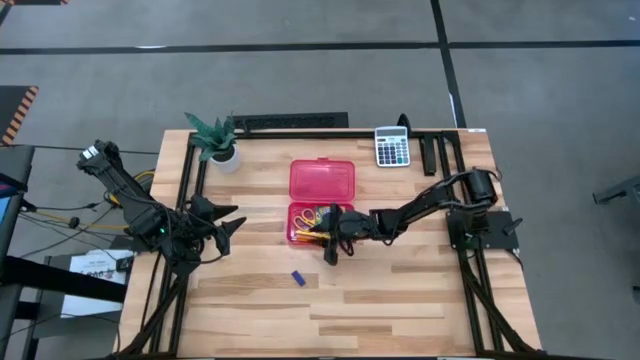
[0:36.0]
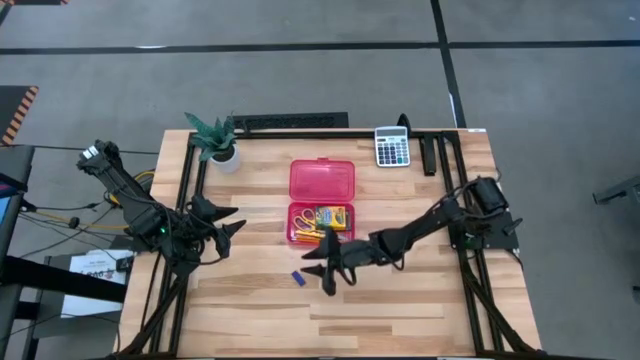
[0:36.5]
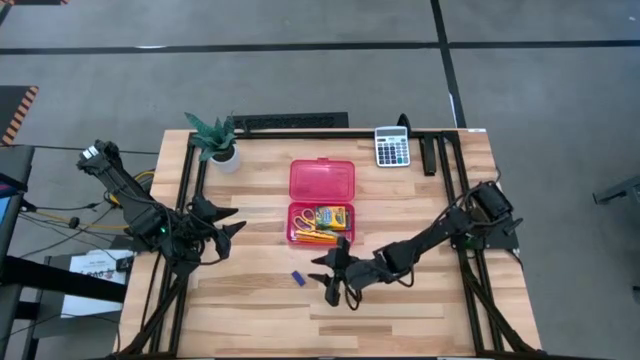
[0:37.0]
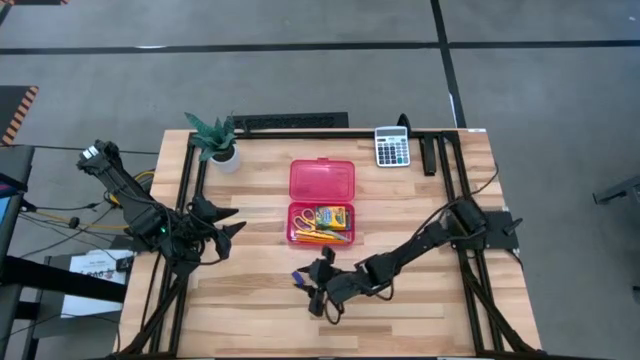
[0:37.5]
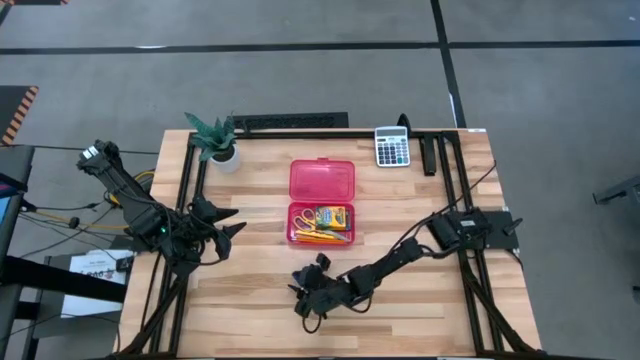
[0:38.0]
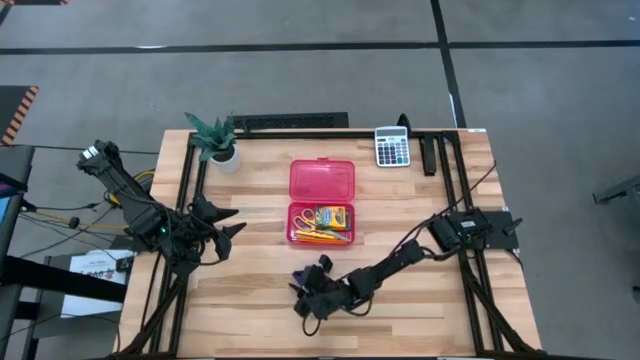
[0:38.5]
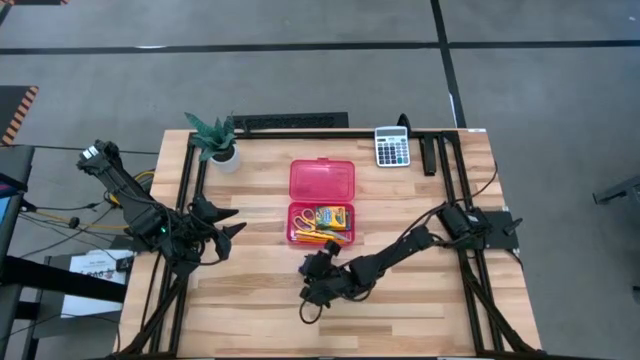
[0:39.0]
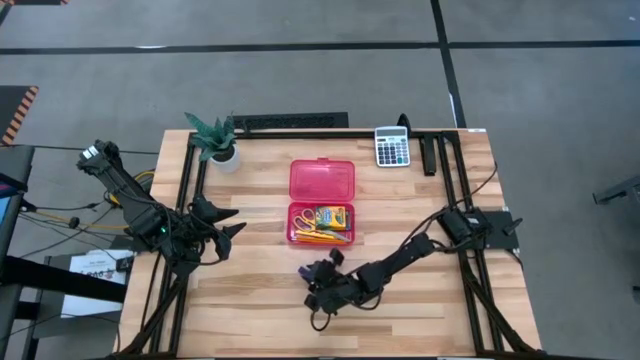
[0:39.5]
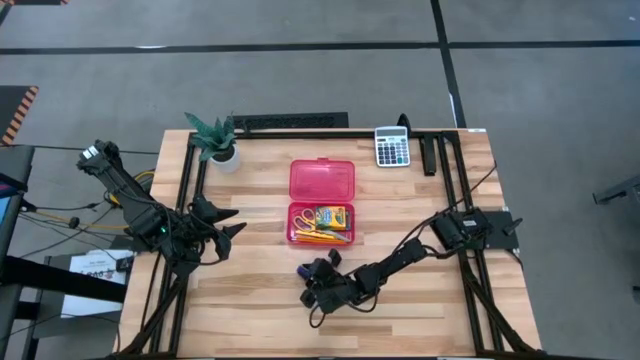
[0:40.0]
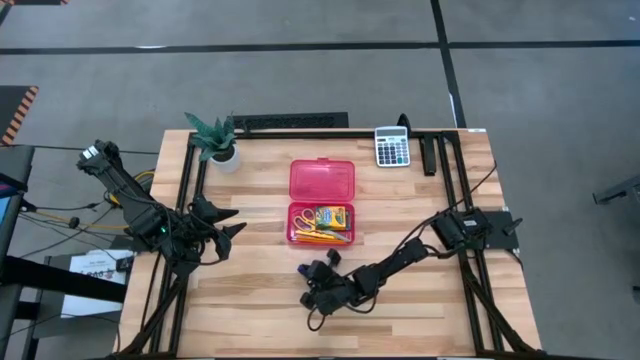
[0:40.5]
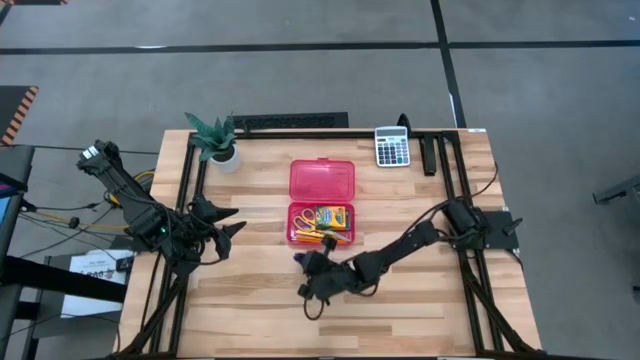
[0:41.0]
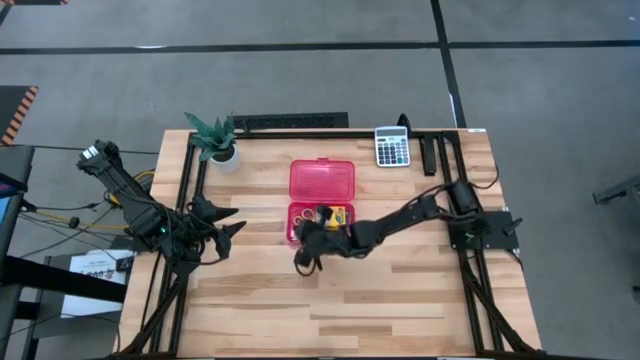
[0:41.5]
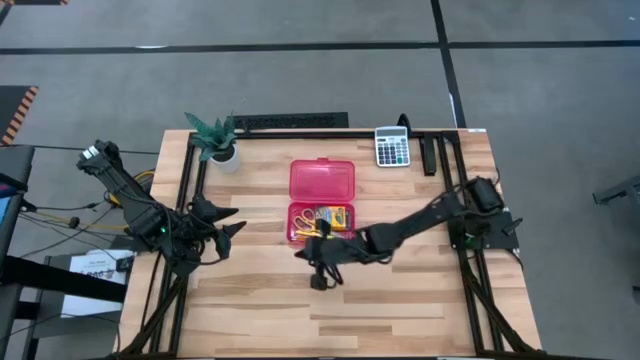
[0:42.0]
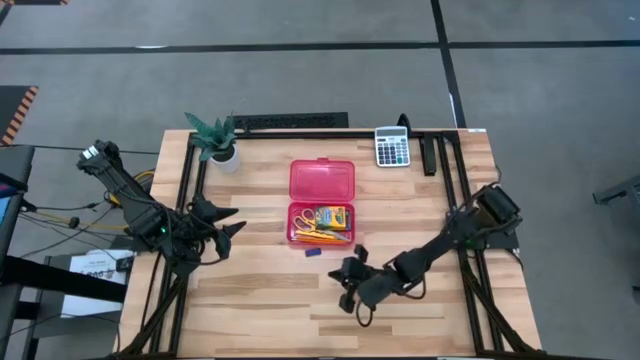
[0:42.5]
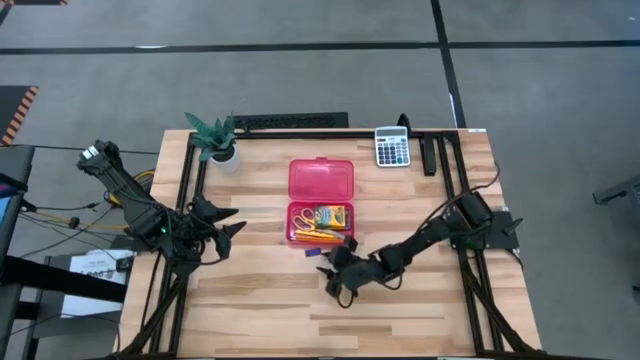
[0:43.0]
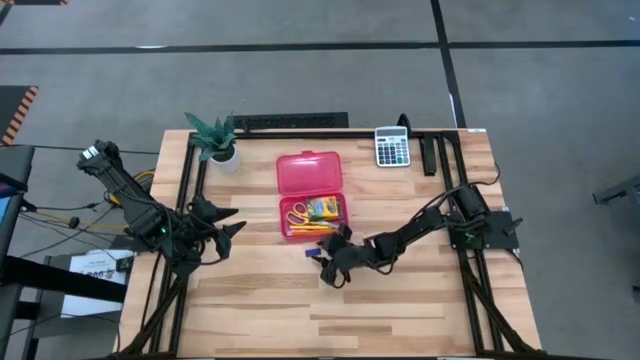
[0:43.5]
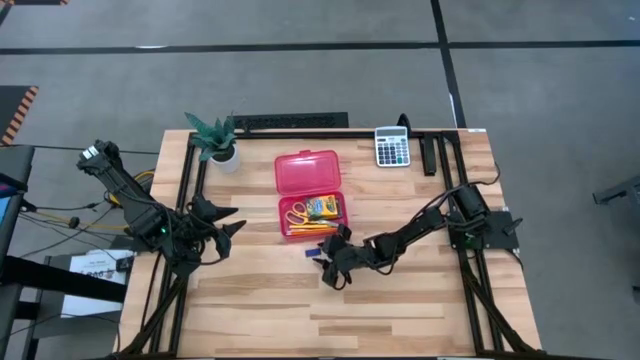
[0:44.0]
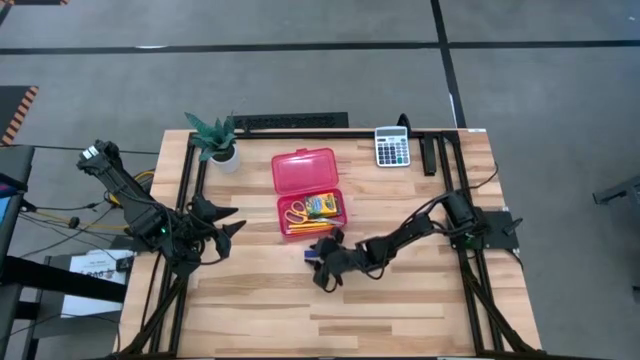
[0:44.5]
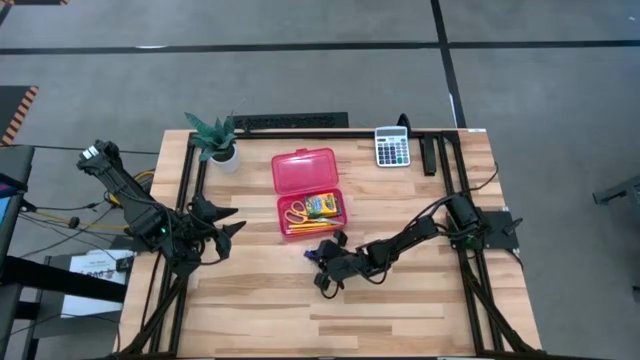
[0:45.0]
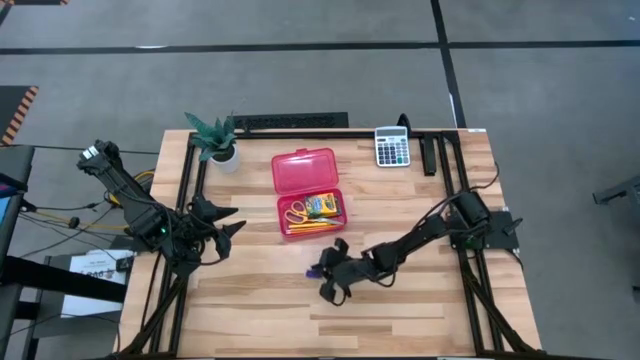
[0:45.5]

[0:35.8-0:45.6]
Task: Pack school essentials
Put the eraser into the supply box

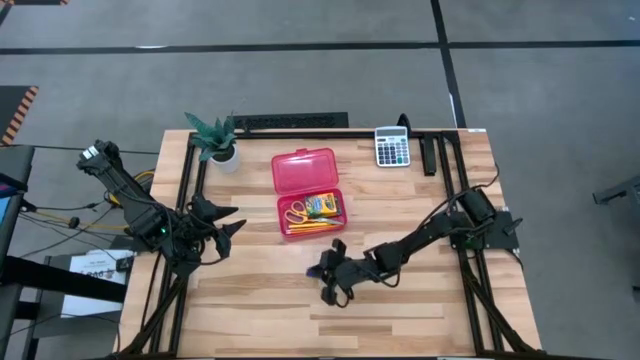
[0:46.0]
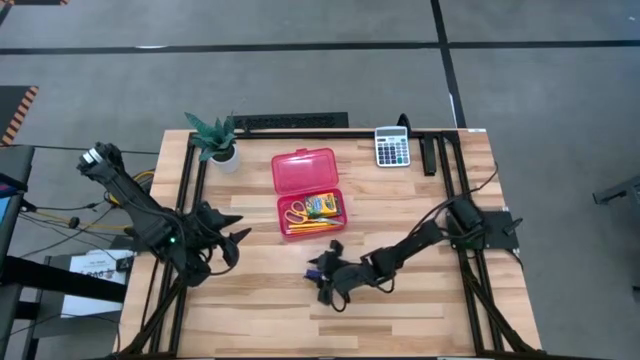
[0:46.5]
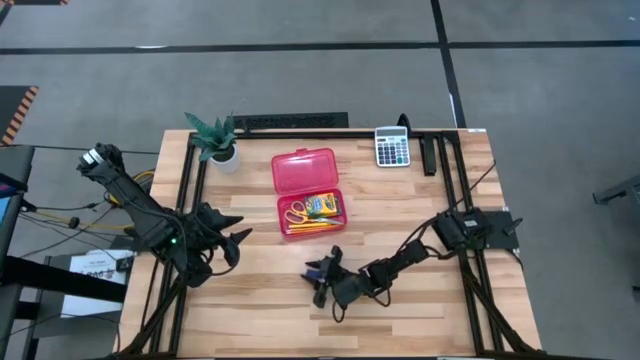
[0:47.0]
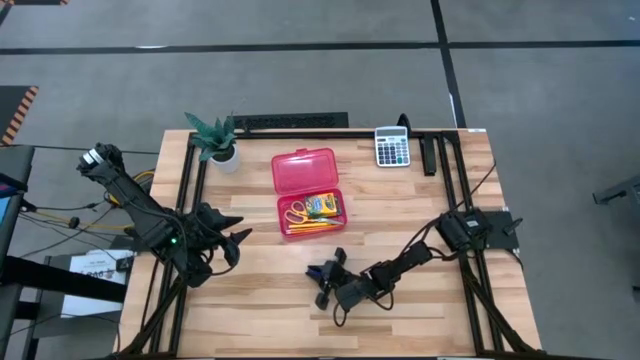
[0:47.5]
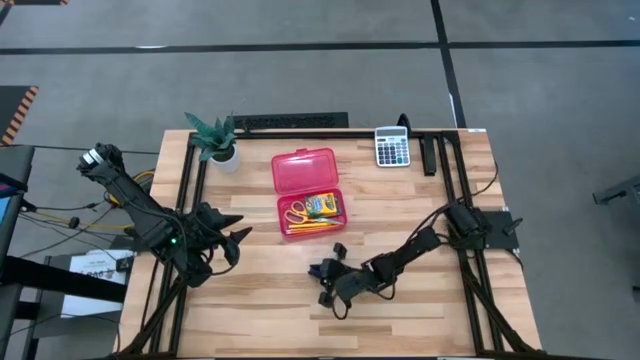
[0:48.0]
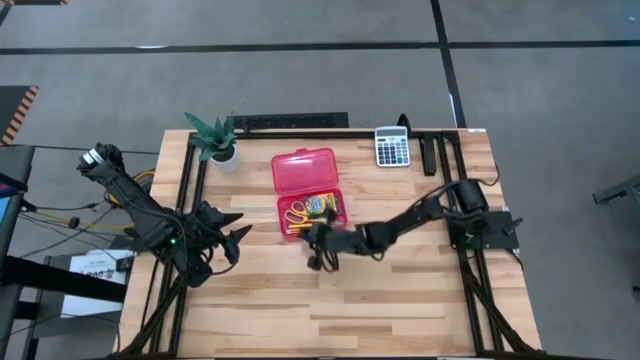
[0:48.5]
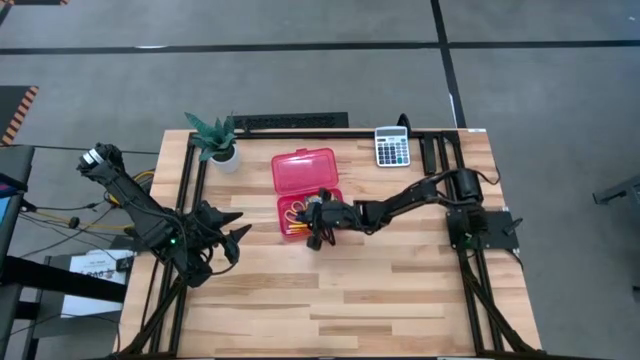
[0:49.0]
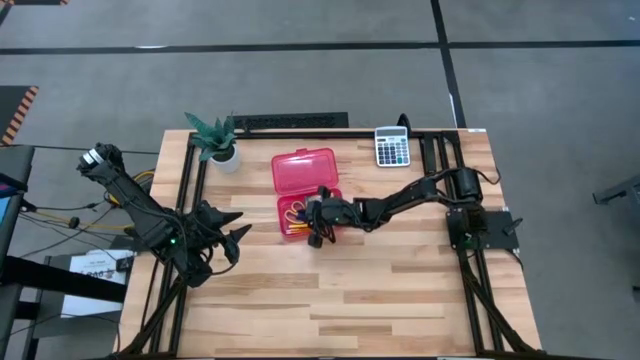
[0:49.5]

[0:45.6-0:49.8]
Put the eraser into the supply box

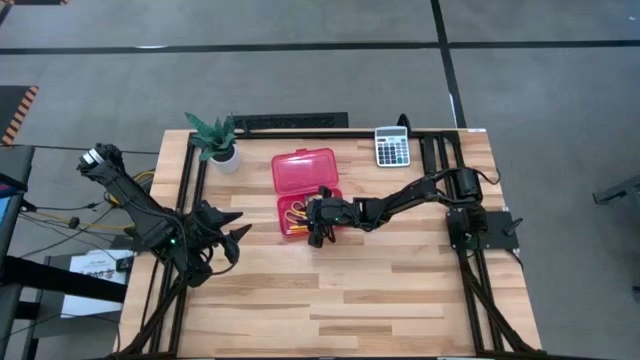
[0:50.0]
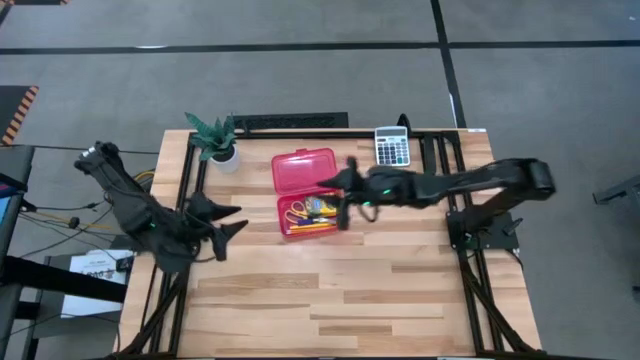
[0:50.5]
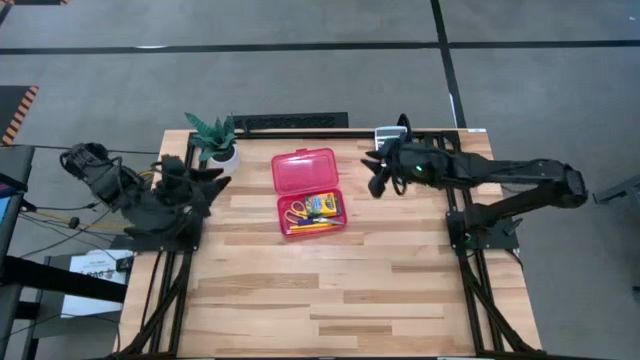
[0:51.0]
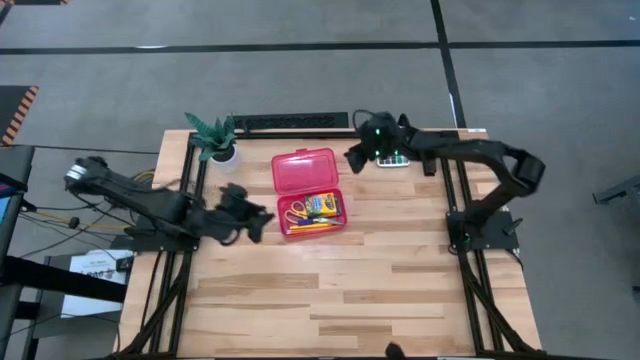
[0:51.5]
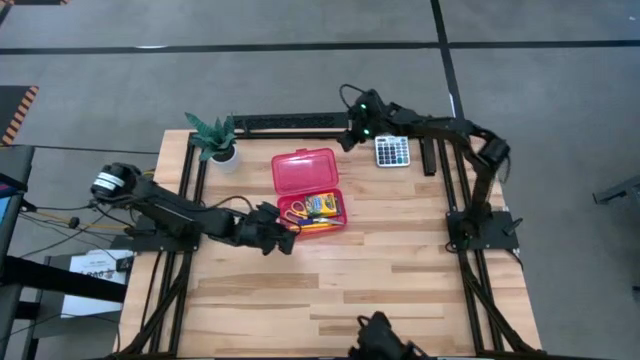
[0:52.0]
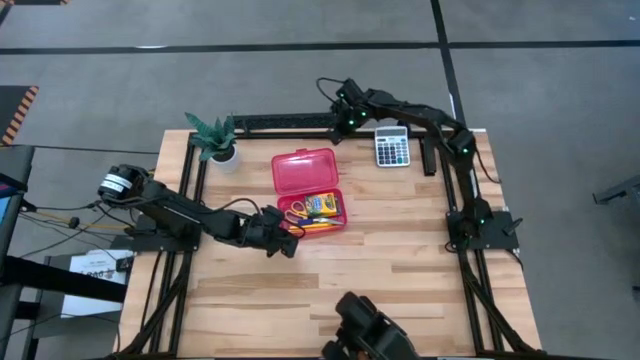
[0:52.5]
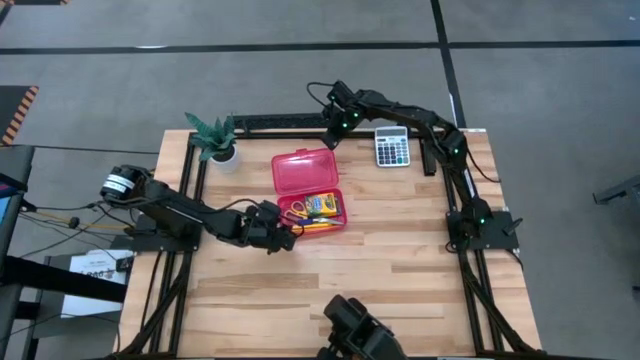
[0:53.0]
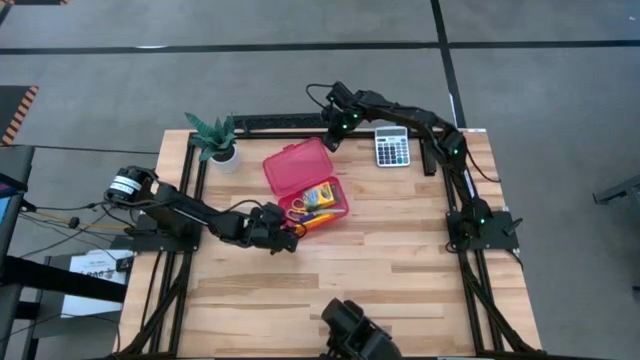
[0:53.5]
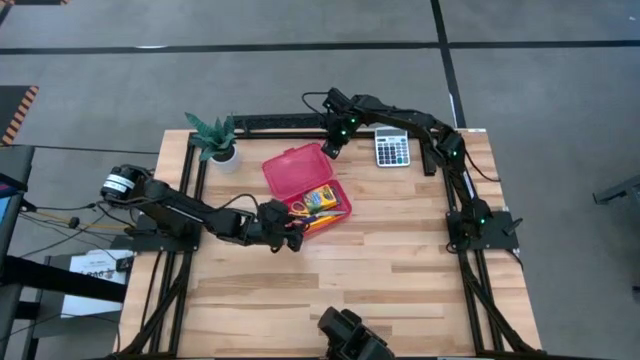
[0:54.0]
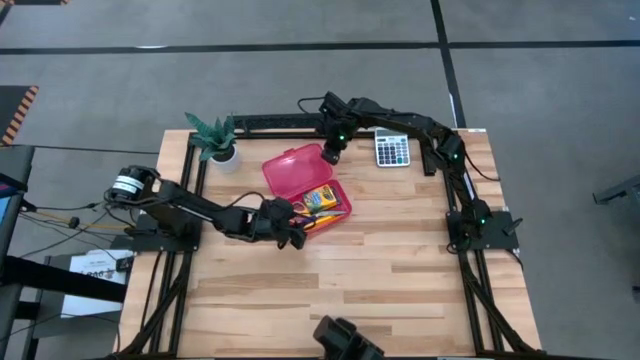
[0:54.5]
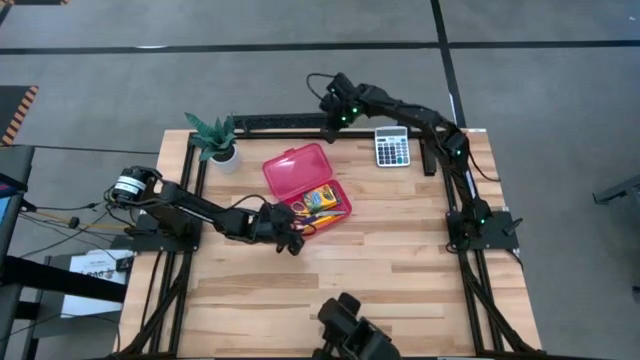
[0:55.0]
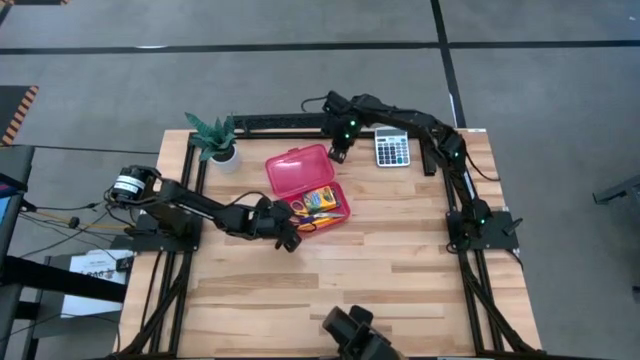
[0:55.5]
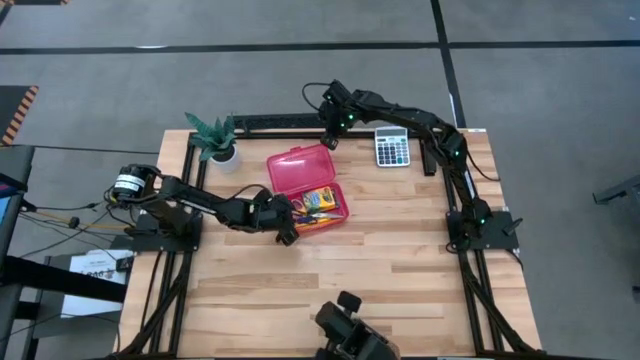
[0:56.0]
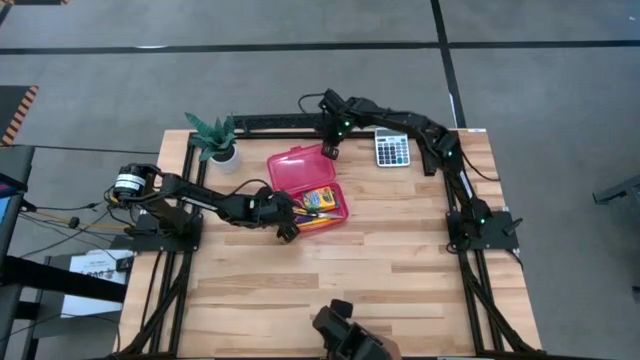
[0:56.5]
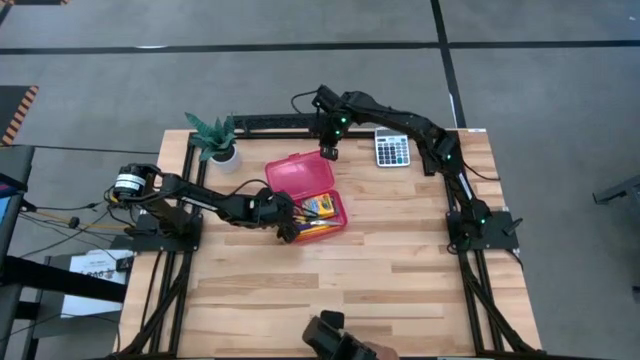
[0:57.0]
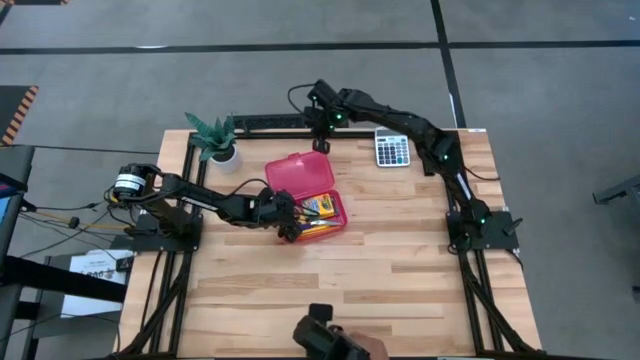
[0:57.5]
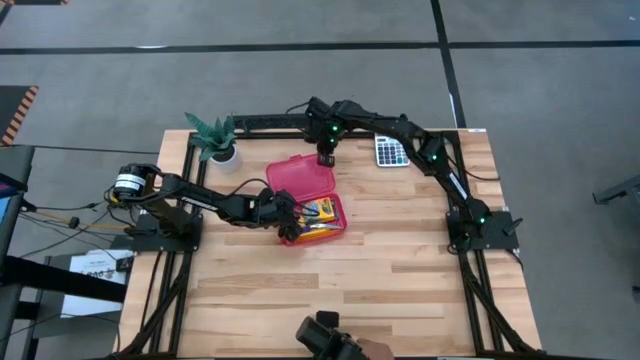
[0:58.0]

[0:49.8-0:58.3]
Close the lid of the supply box
